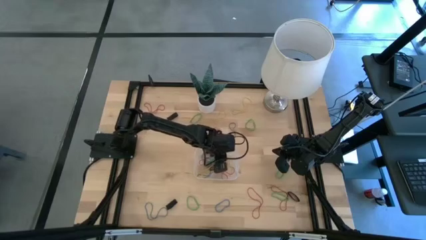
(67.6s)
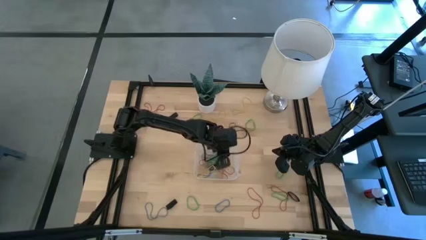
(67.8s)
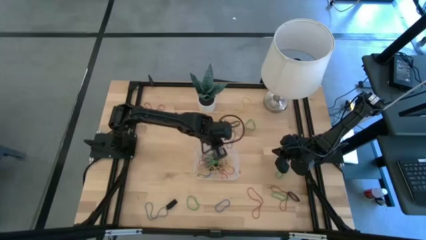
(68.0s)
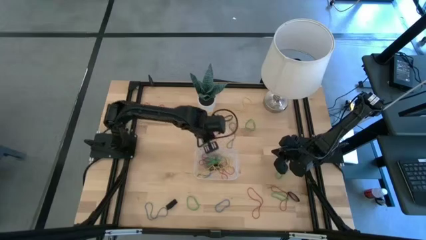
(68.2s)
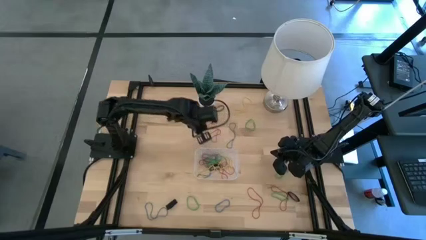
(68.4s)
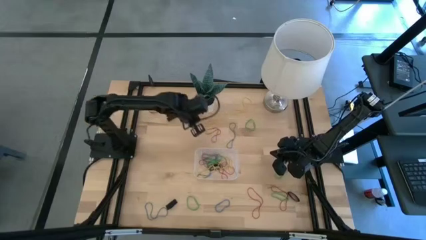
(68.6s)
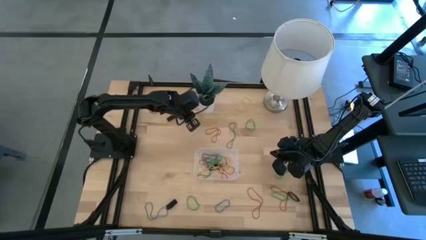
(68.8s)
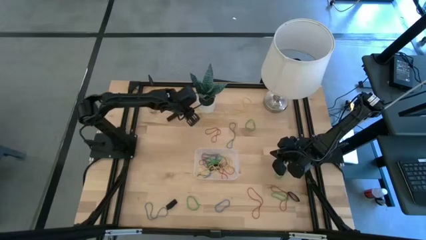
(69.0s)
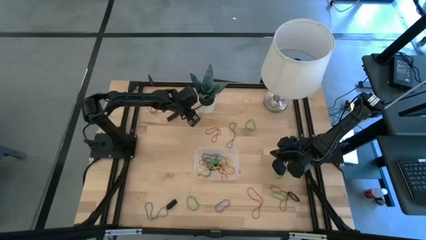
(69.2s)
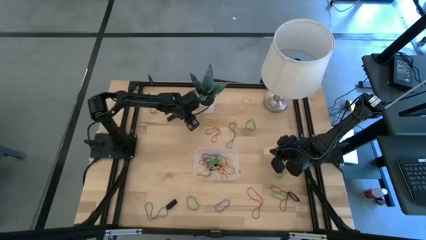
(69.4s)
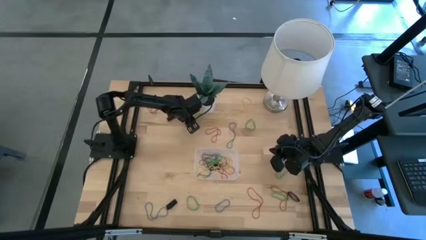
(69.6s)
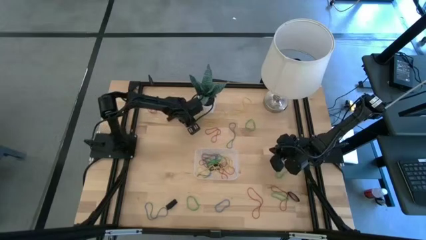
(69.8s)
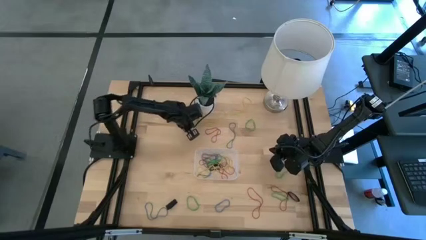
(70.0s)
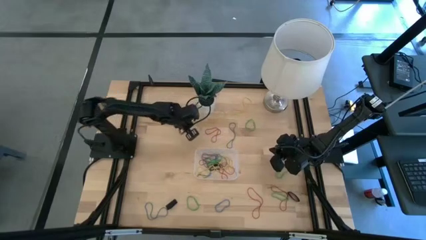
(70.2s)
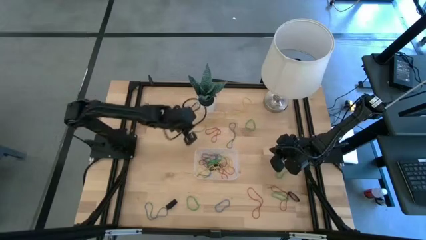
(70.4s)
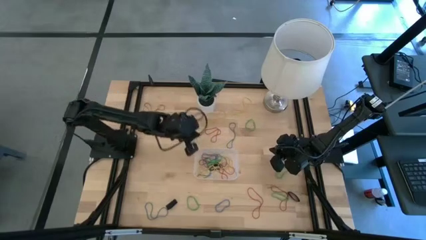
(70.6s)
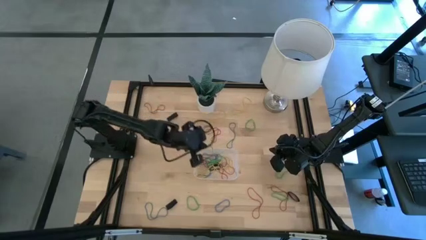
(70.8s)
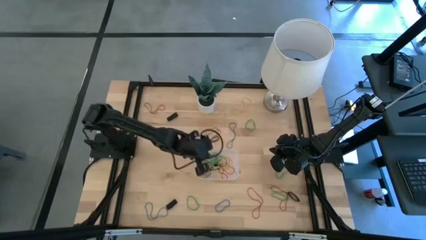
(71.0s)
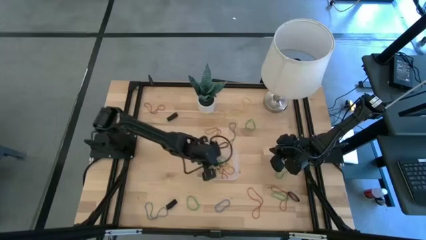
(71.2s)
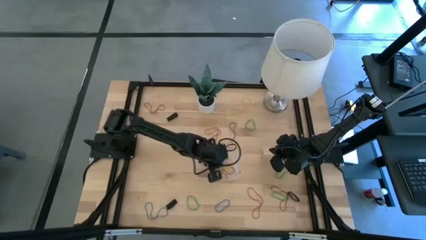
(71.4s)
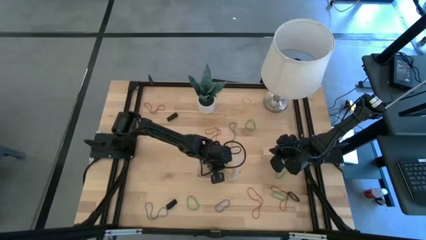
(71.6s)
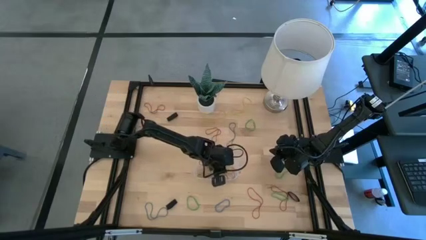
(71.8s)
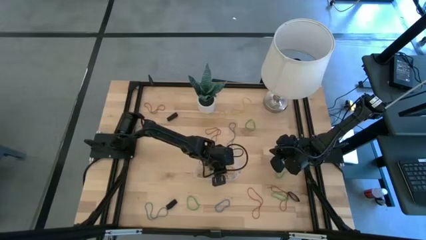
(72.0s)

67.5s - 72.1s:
Task: Pick and place rubber bands into bin
Put the green rubber band into the transparent bin

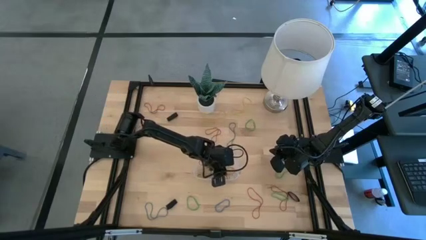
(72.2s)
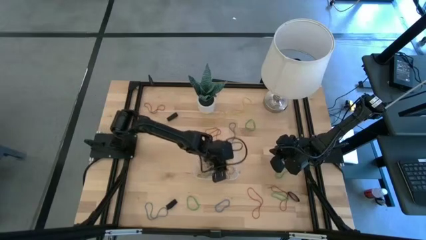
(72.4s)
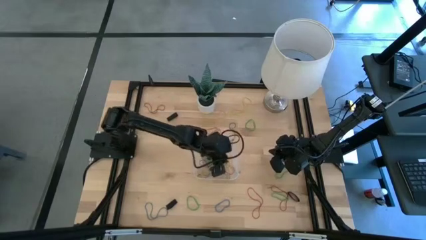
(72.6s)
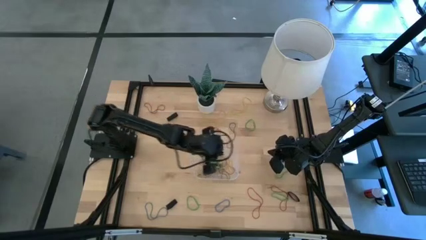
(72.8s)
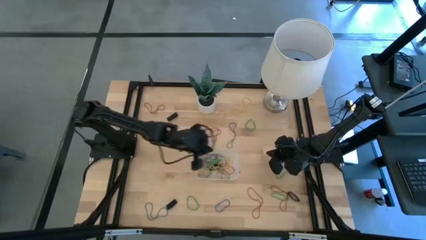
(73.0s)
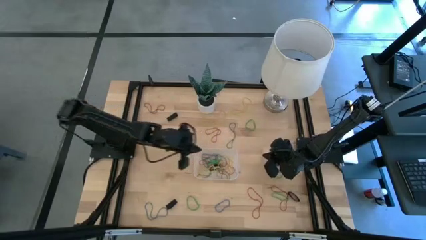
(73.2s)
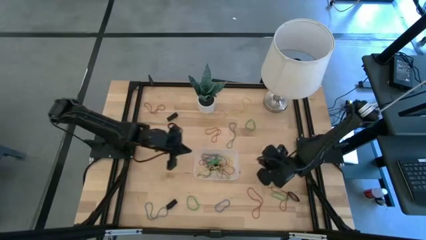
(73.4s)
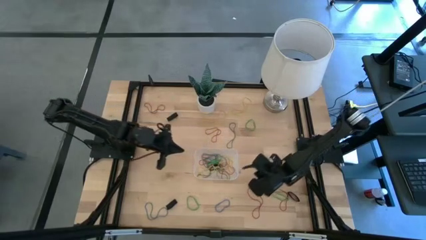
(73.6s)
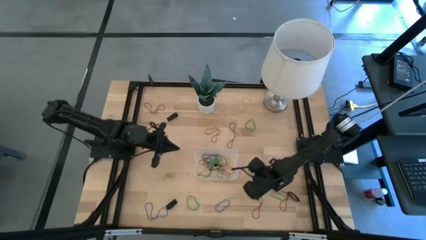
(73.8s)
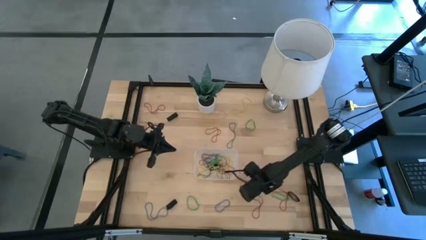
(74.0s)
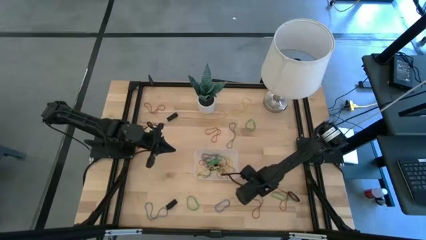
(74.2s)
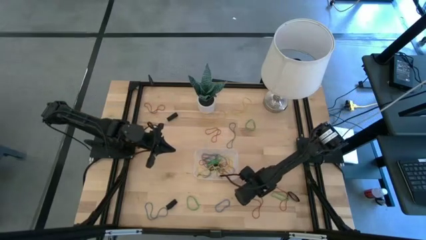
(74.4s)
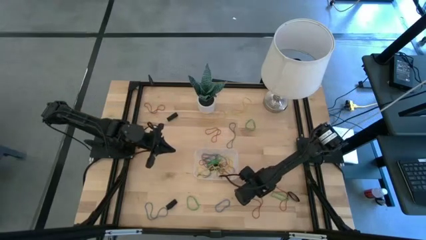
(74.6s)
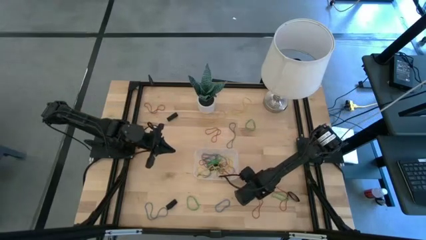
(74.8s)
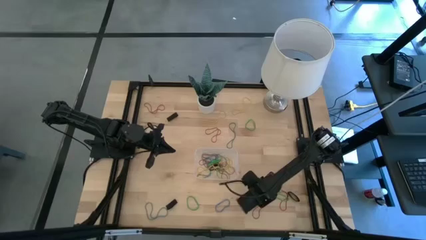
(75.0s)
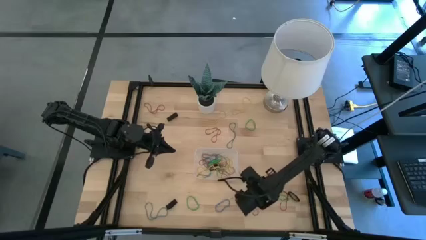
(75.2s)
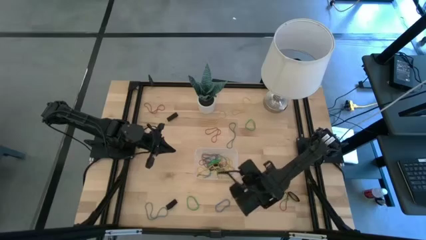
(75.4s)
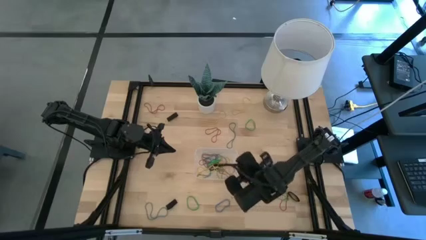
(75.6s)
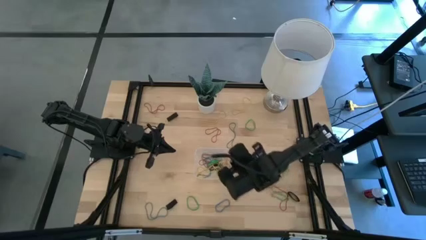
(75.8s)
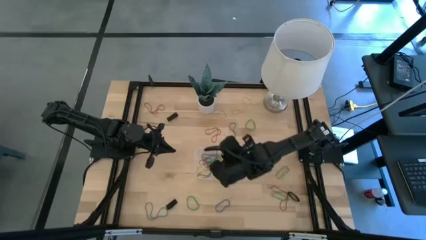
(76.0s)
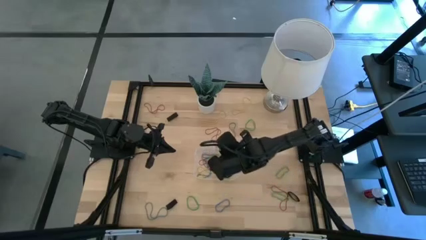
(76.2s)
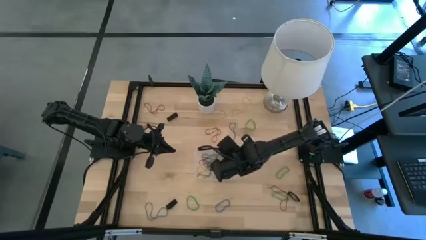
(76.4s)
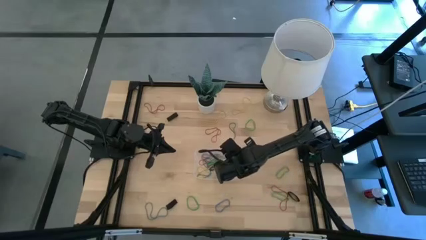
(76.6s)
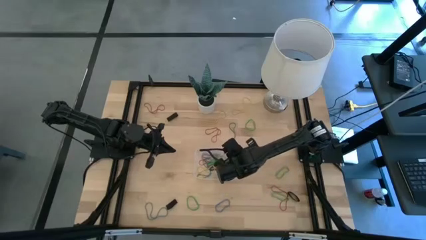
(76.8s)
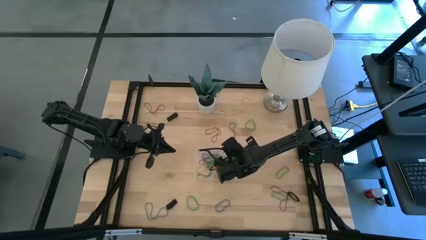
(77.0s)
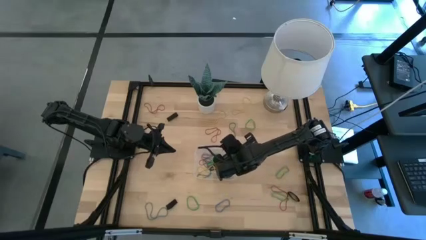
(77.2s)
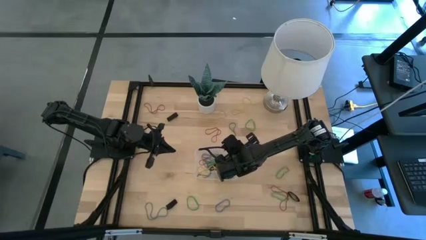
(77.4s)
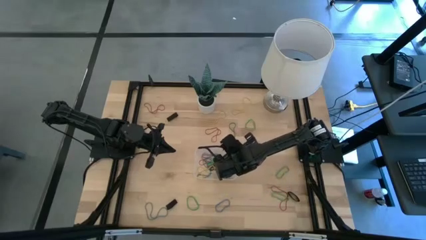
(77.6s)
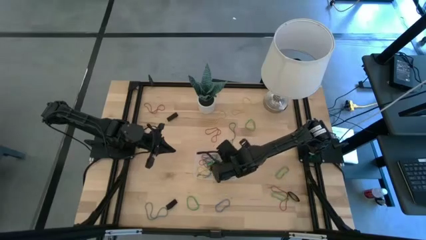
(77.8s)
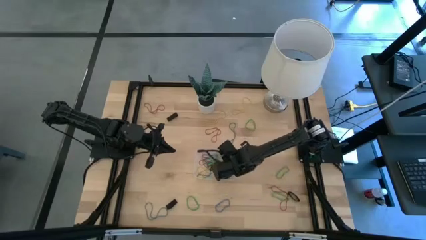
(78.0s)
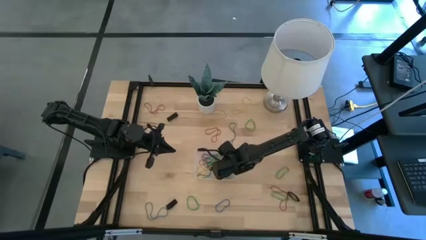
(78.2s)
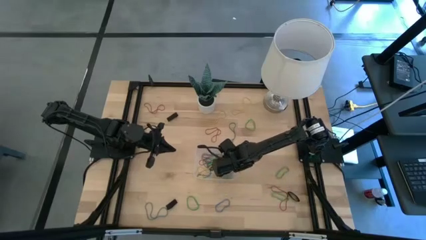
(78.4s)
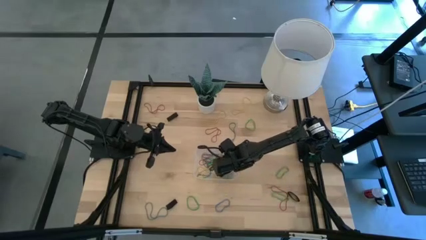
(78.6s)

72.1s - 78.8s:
Put the red rubber band into the transparent bin

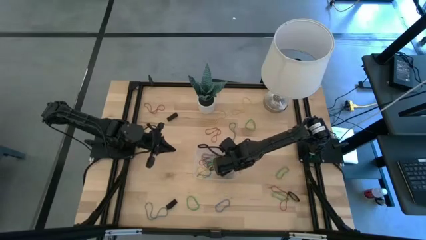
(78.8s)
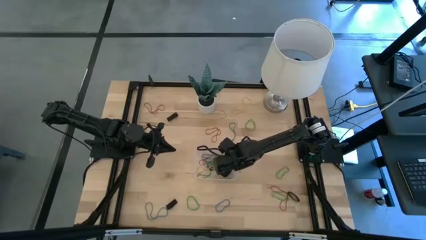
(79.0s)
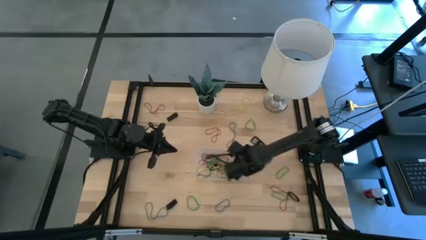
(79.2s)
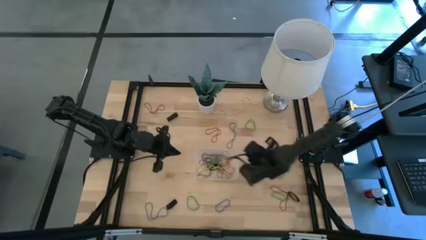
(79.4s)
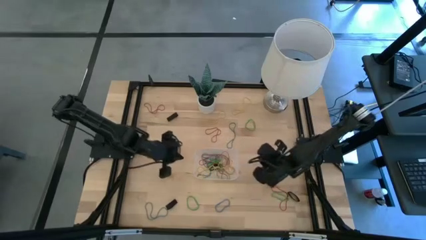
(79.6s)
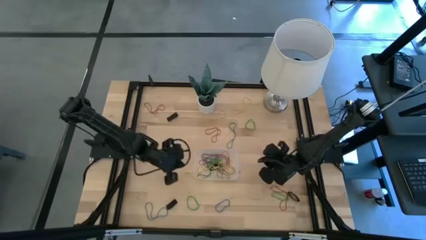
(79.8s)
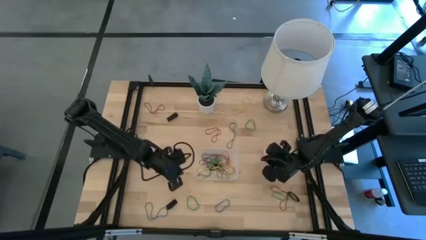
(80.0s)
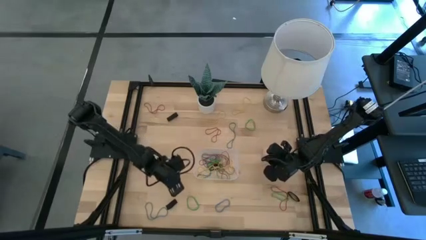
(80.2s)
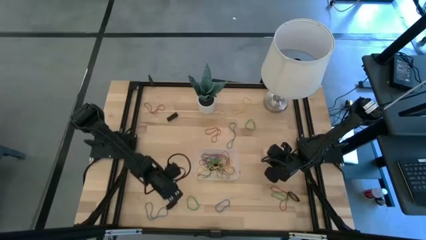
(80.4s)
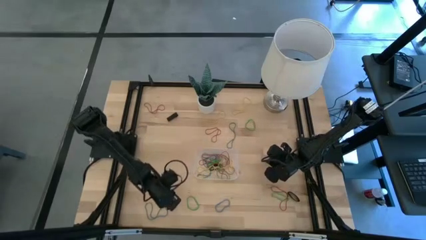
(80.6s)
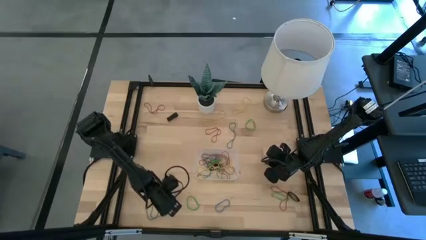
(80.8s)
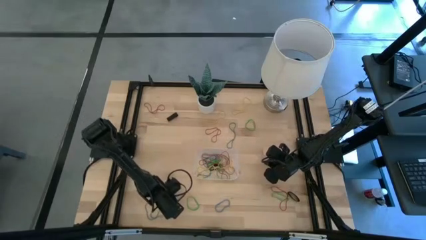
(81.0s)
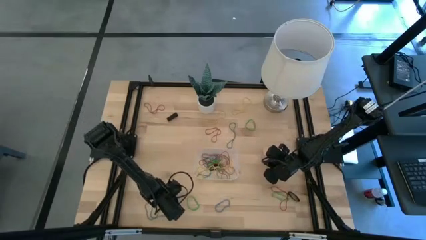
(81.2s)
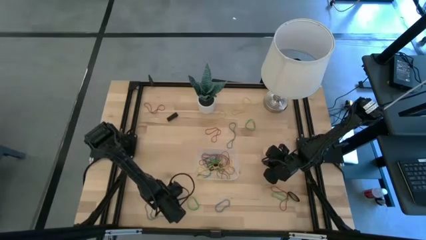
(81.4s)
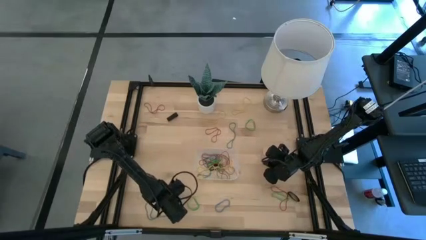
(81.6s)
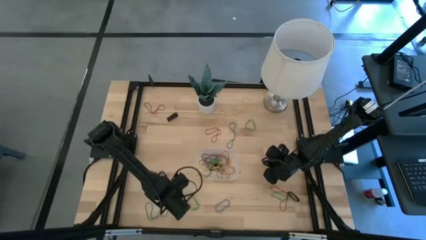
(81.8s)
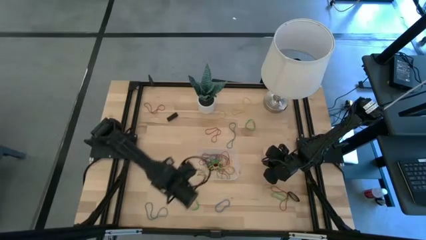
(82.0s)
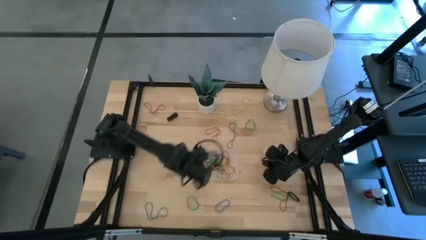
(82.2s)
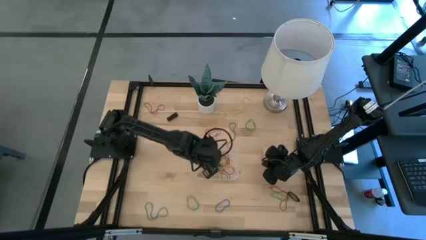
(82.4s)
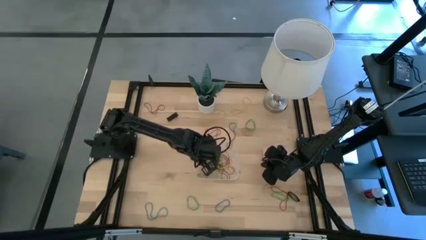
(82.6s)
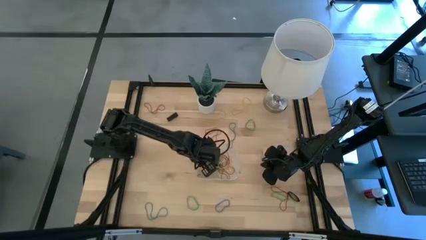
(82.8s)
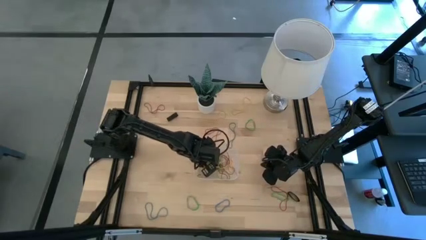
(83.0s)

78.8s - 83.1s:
Put the bottom left black rubber band into the transparent bin
